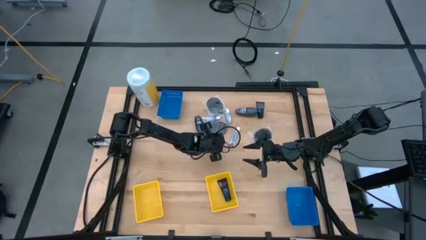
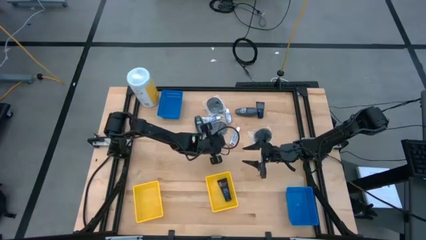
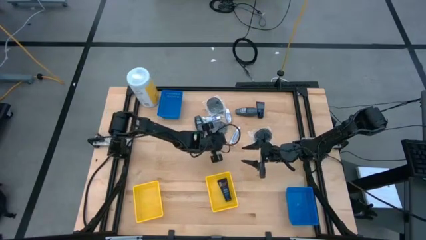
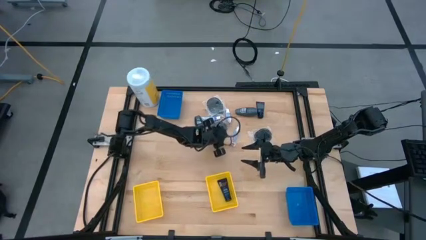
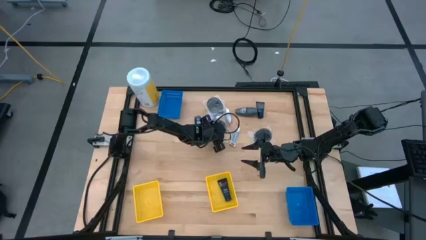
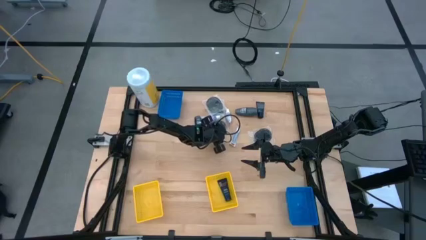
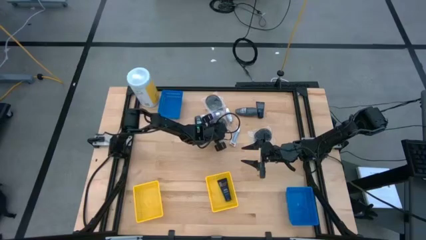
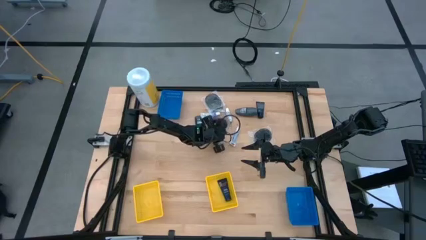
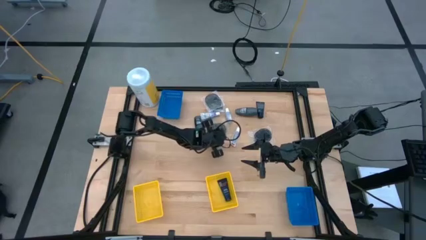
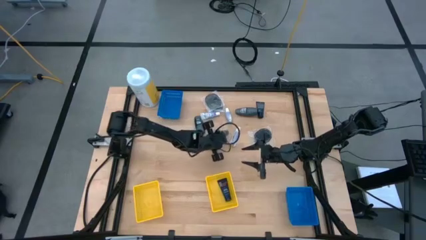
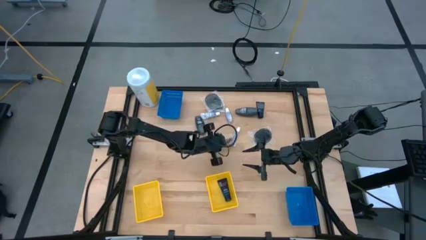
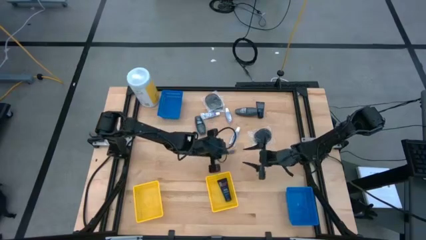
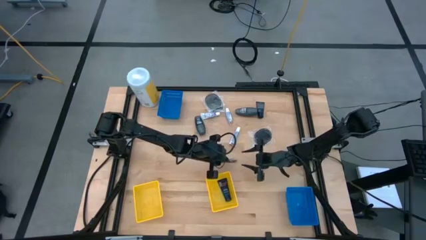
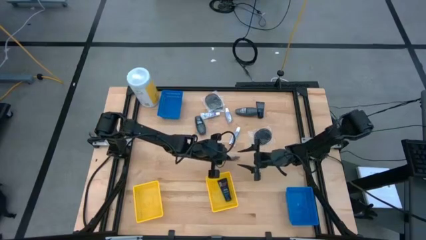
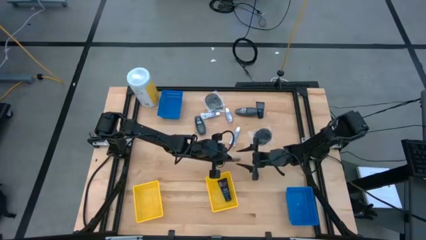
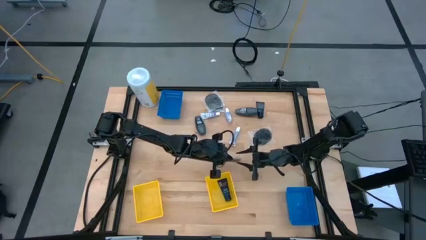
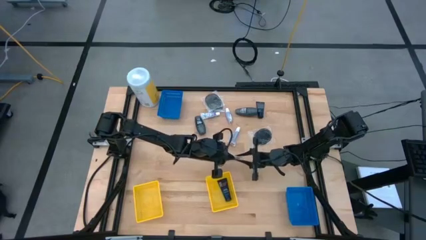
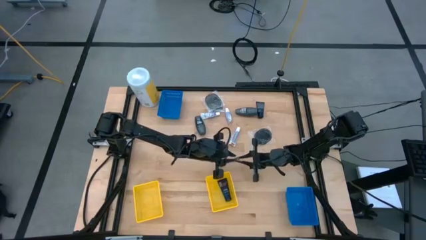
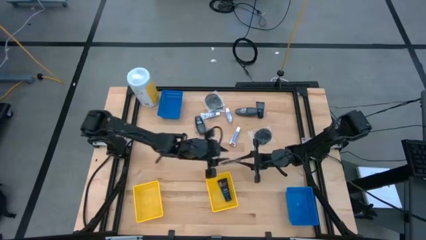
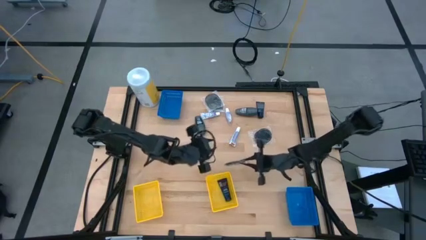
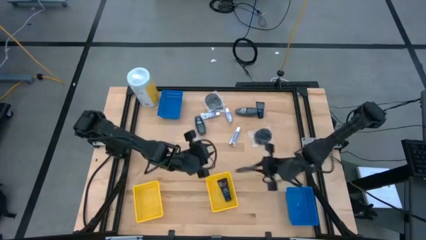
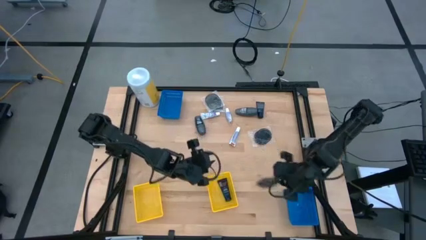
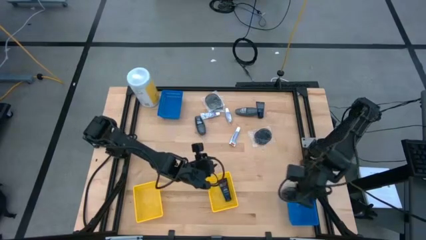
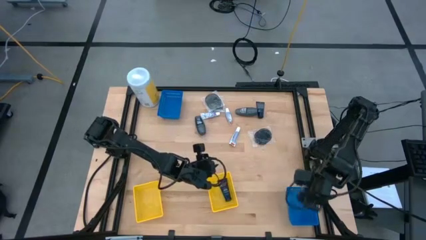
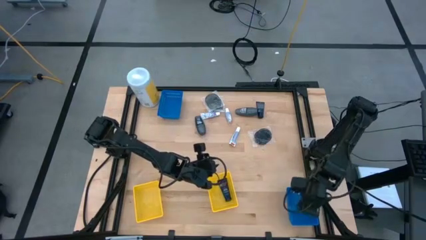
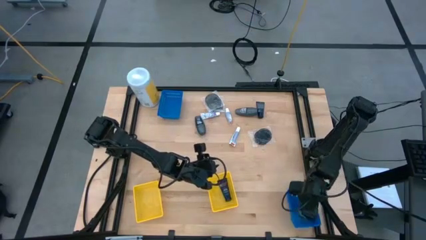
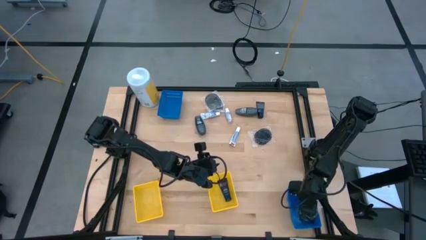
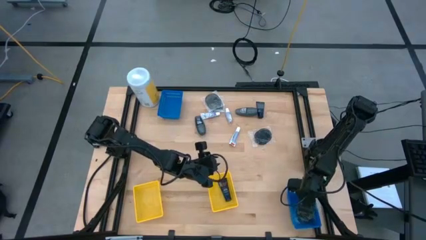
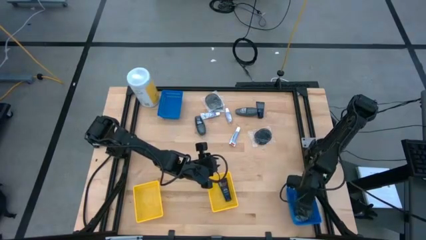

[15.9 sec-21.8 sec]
Task: Pick & Place Travel size toiletries
Put the black hairbrush into the bottom blue bin

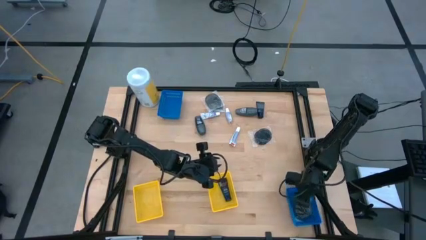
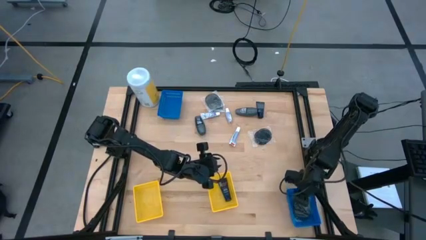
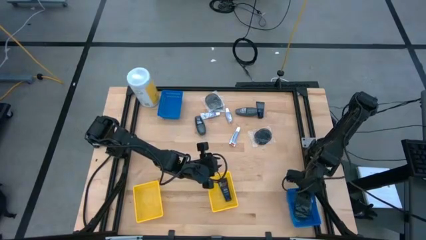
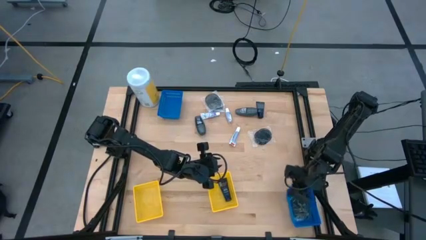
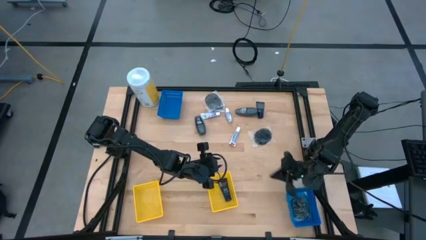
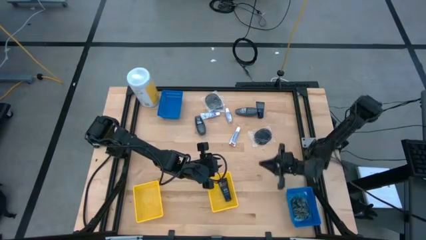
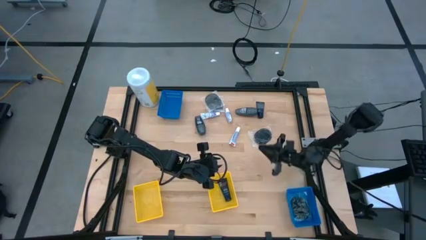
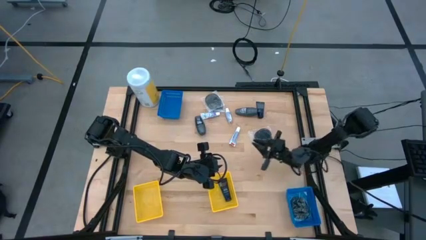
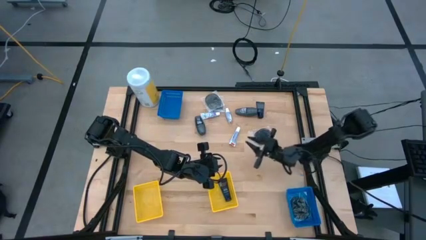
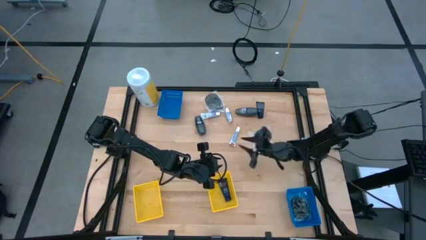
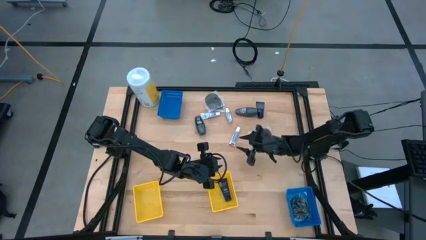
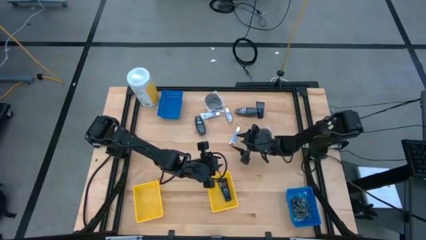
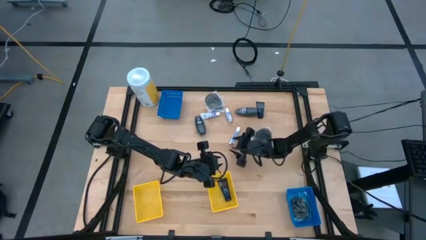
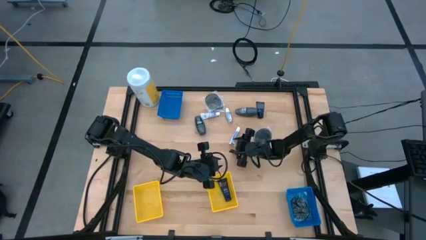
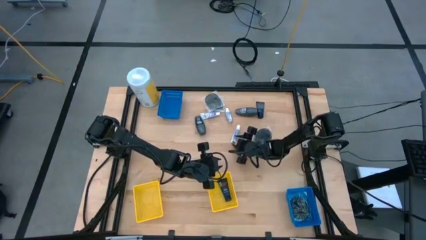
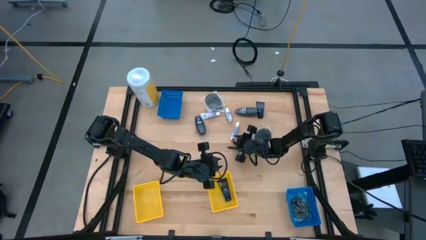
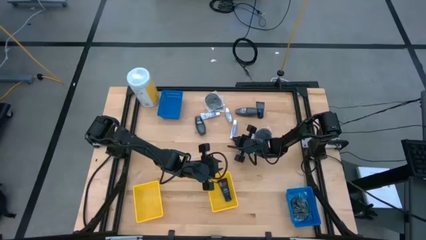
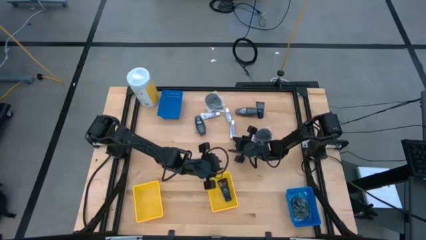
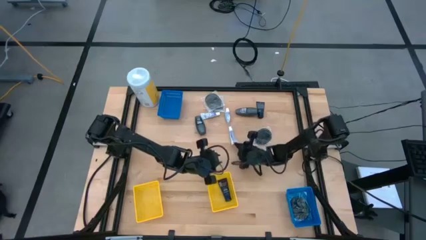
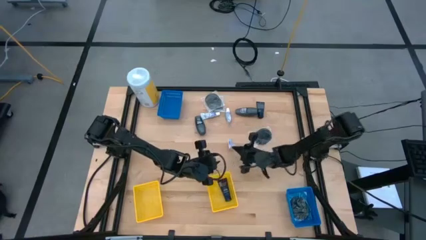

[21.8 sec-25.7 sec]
Put the white toothpaste into the left yellow bin

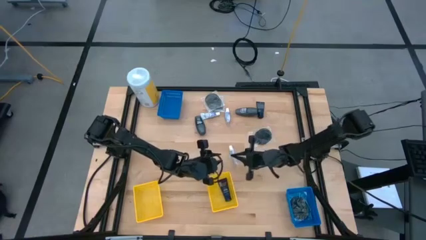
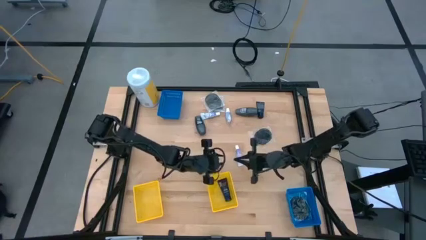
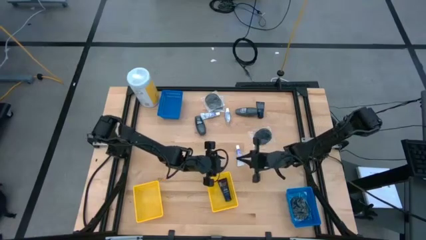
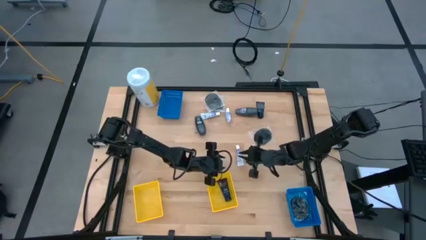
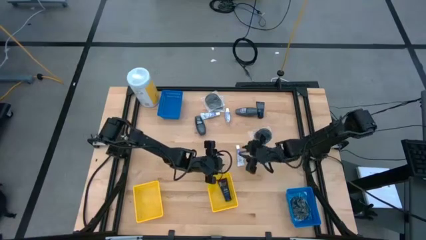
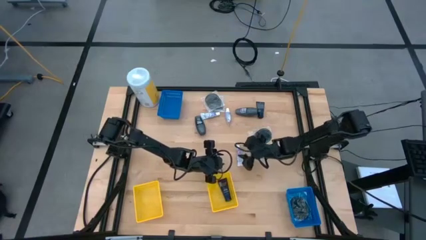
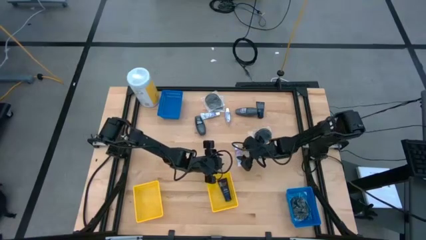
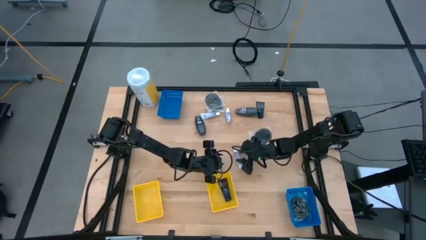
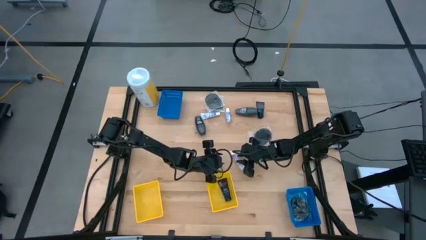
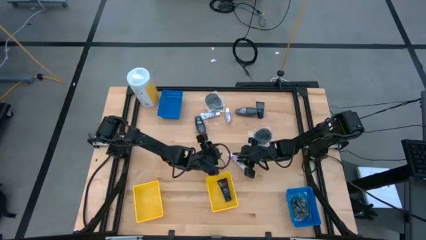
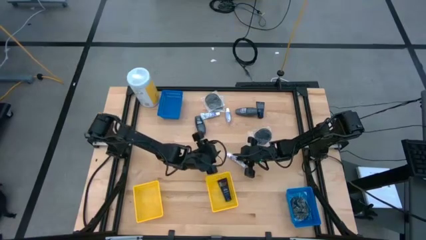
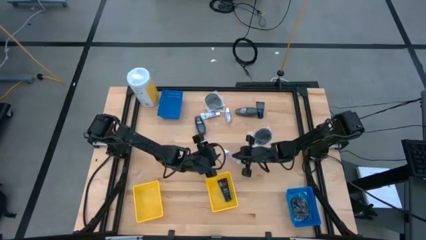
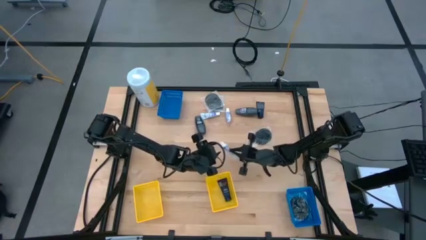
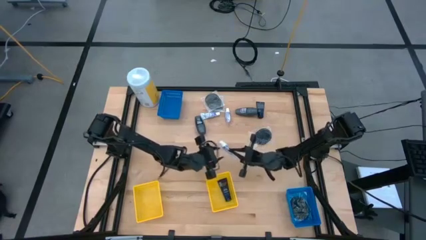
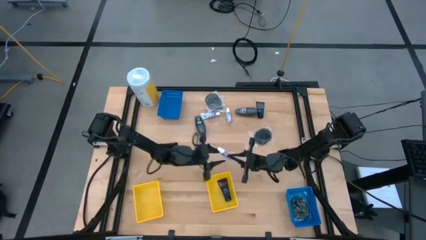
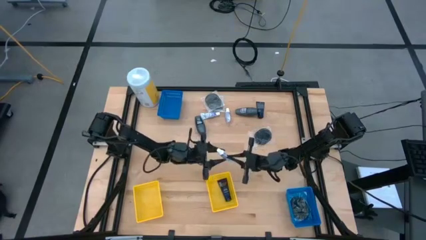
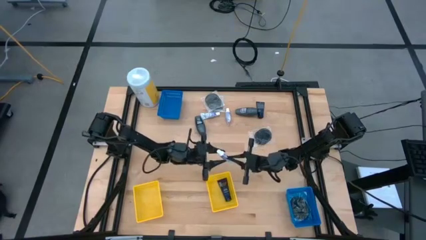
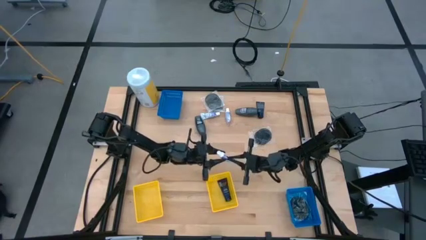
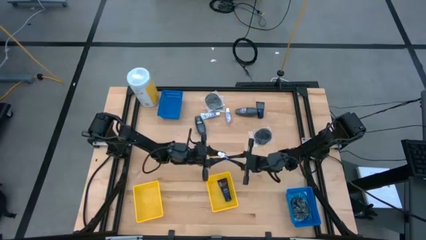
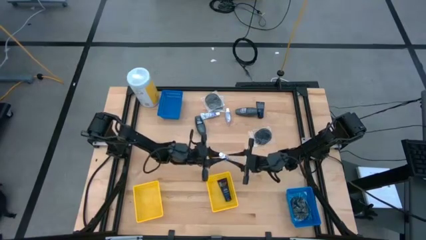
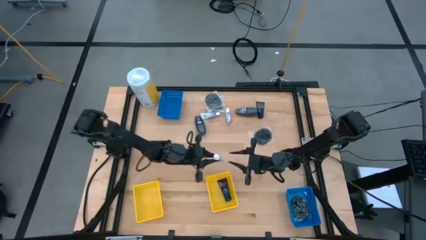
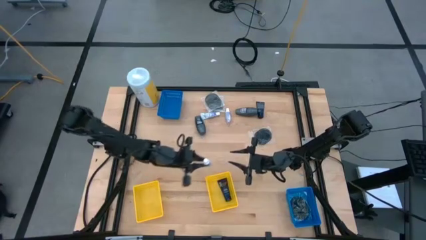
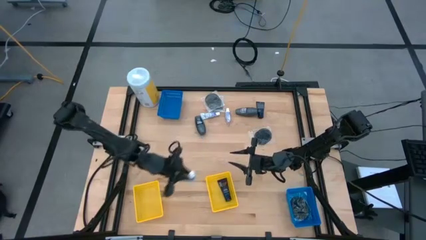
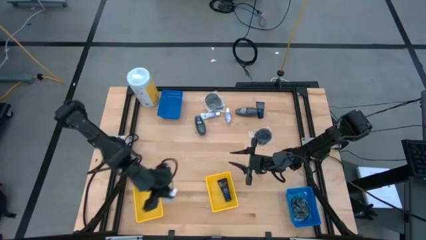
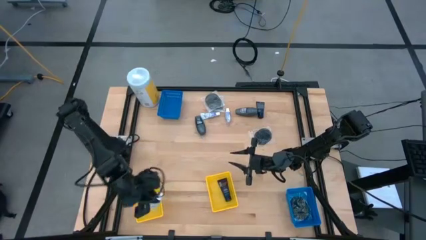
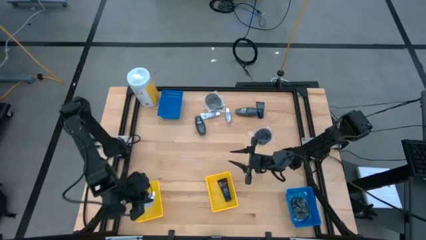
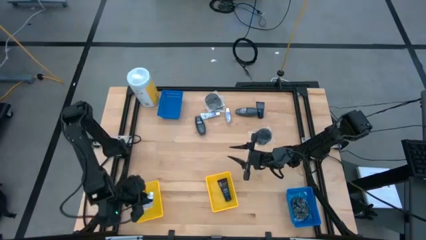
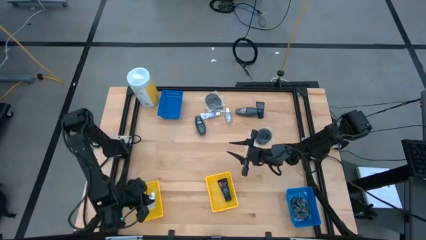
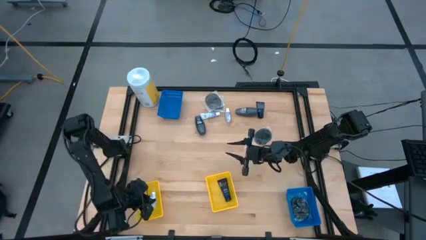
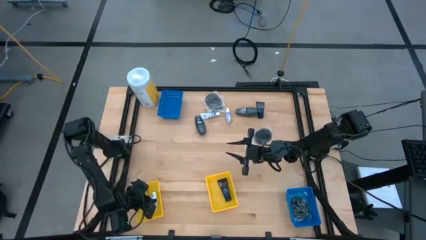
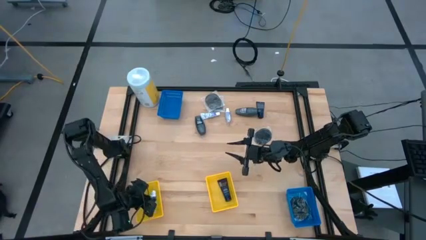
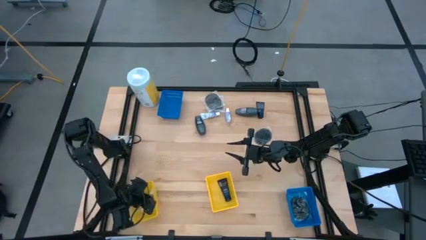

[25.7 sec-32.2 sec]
Put the white toothpaste into the left yellow bin
